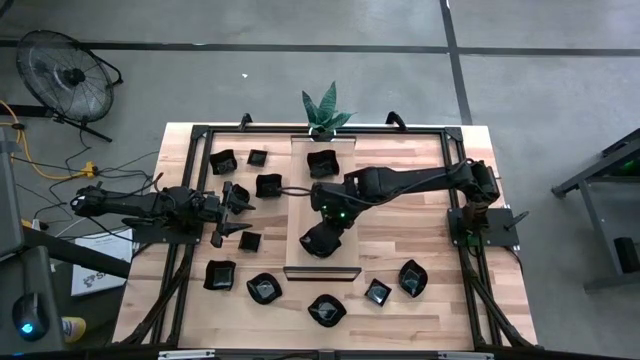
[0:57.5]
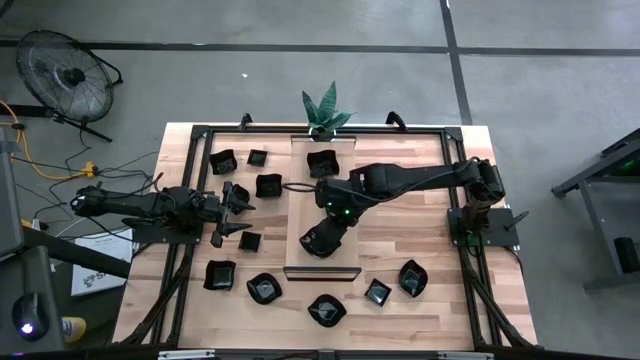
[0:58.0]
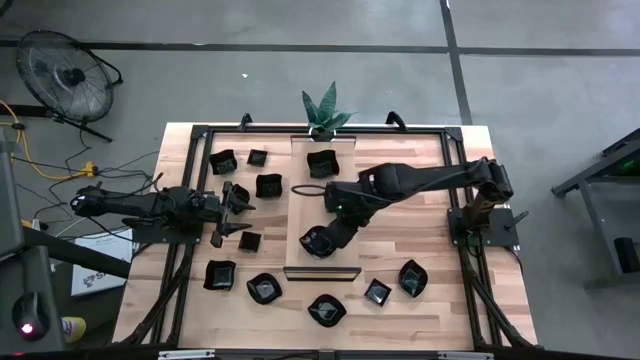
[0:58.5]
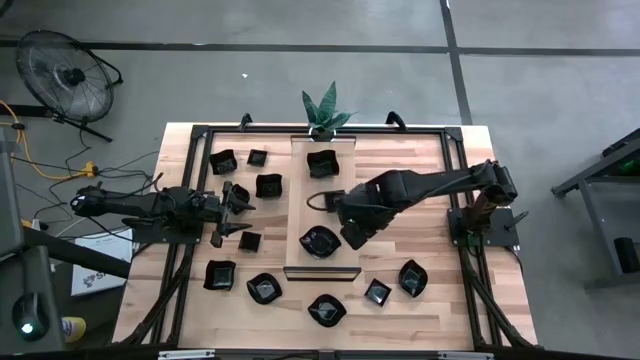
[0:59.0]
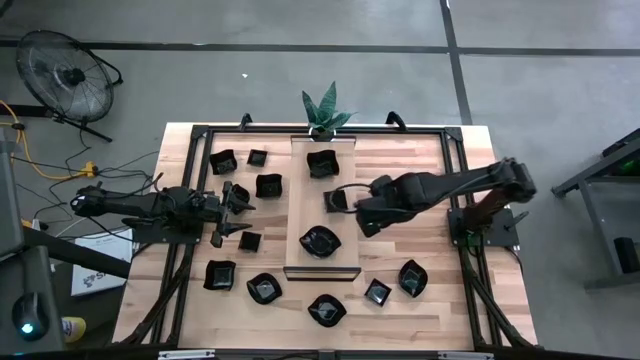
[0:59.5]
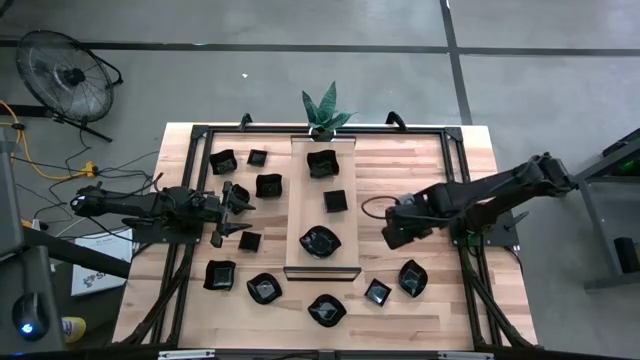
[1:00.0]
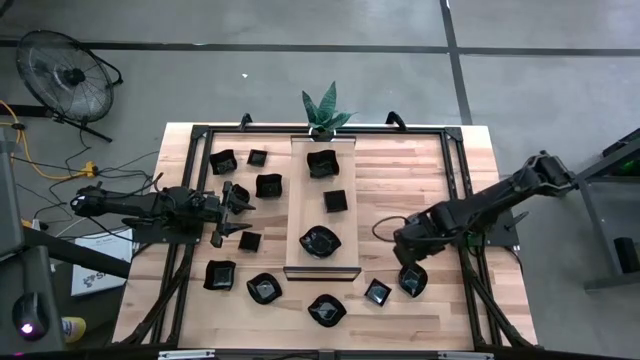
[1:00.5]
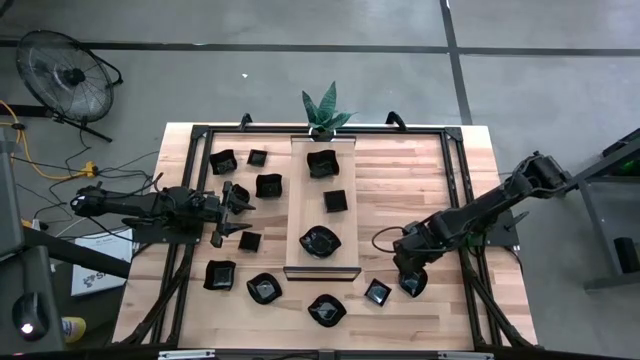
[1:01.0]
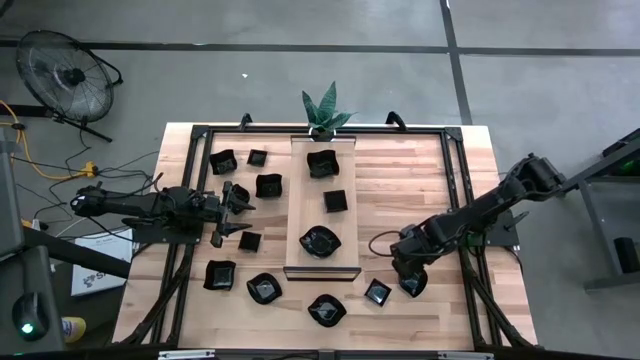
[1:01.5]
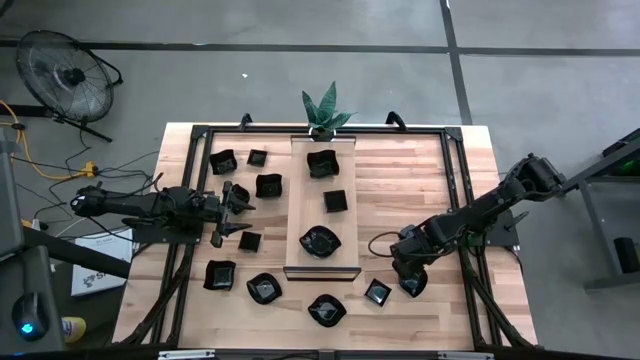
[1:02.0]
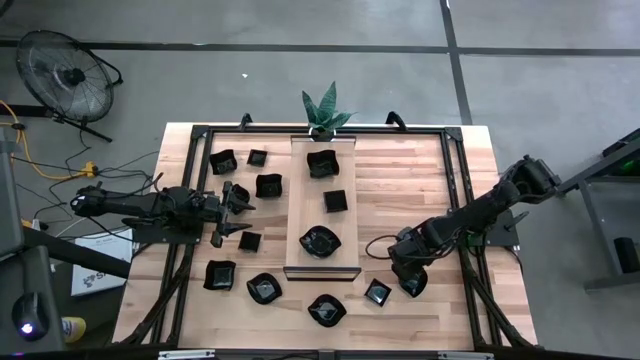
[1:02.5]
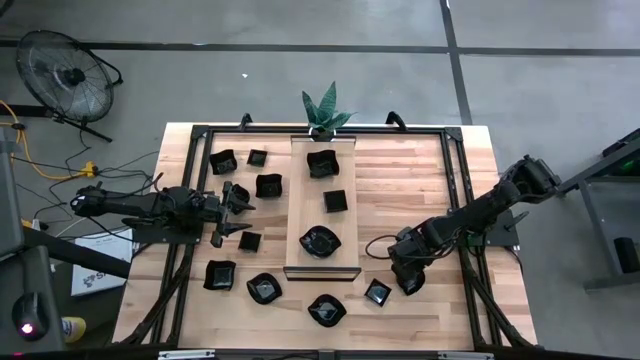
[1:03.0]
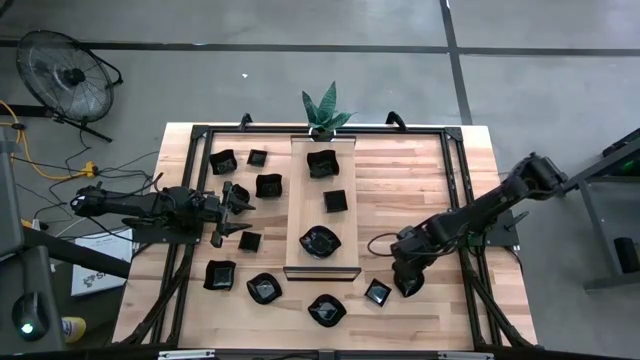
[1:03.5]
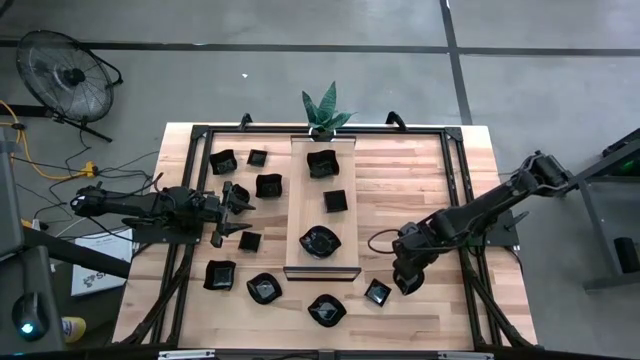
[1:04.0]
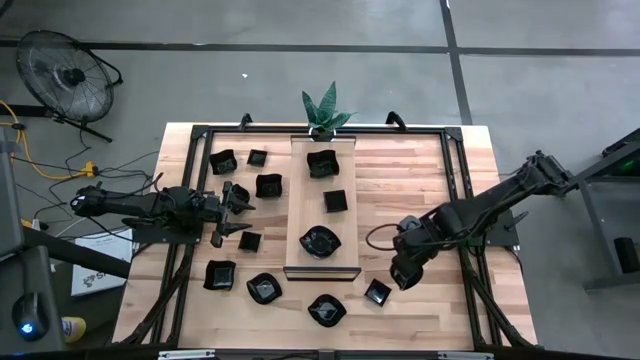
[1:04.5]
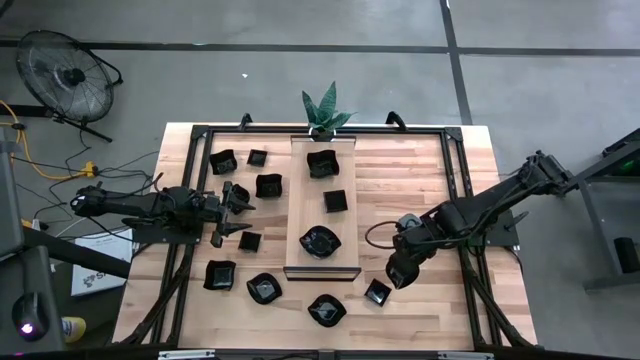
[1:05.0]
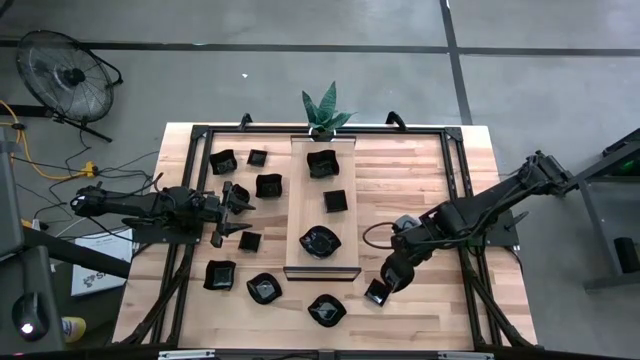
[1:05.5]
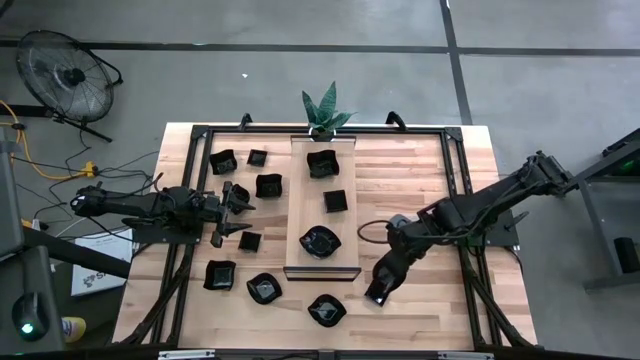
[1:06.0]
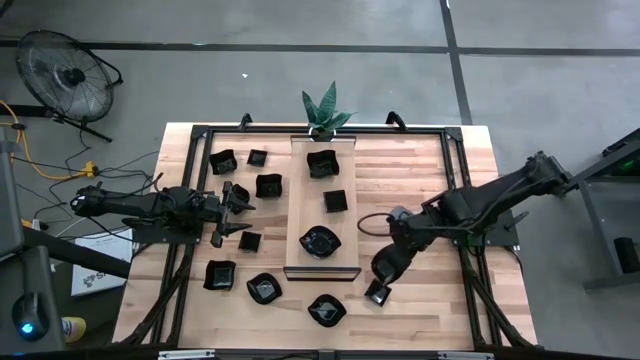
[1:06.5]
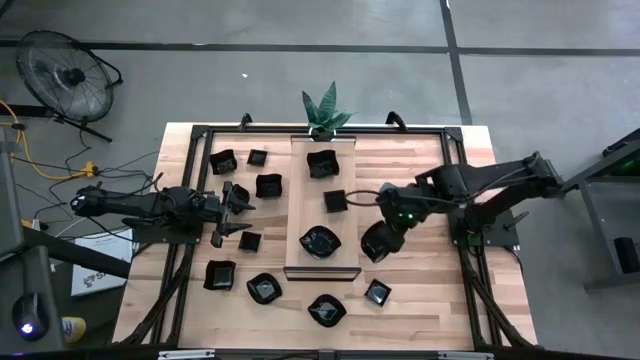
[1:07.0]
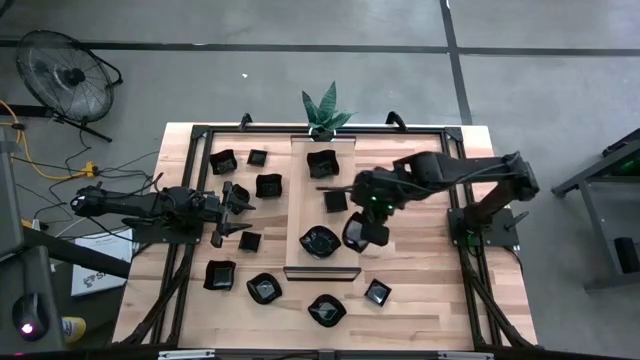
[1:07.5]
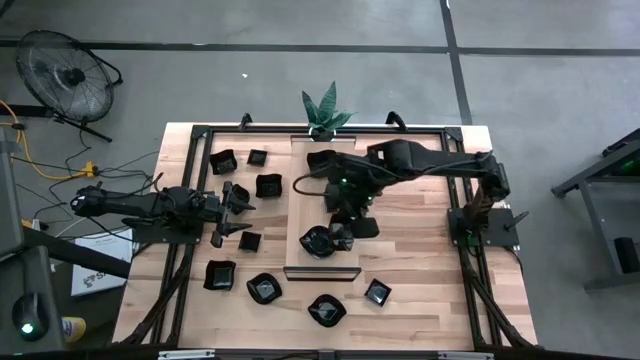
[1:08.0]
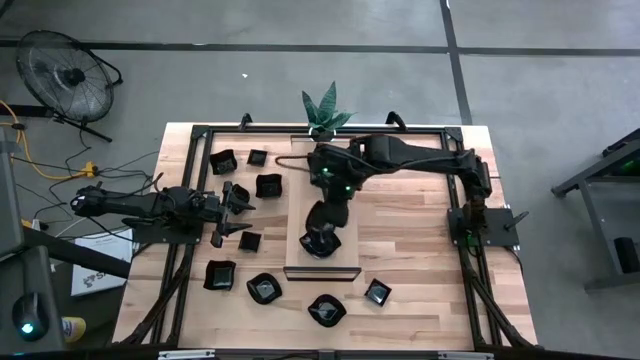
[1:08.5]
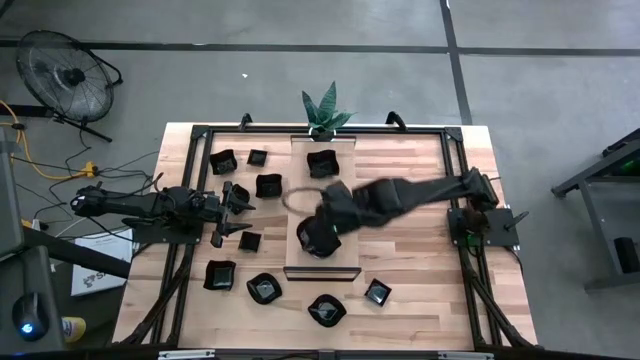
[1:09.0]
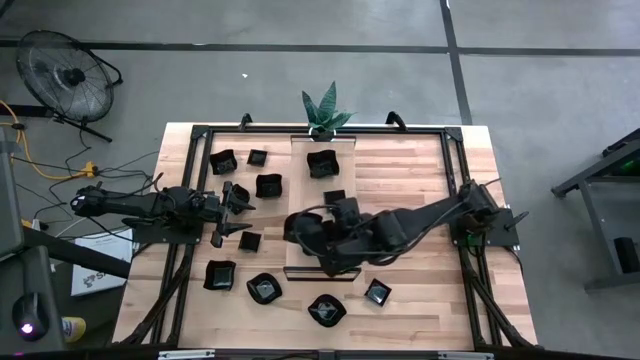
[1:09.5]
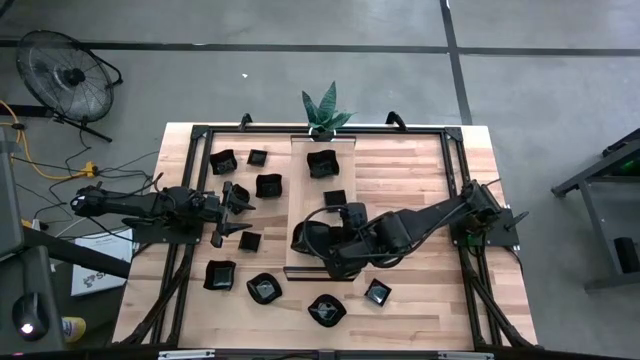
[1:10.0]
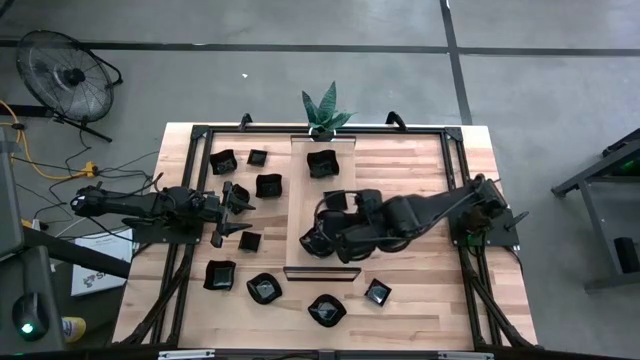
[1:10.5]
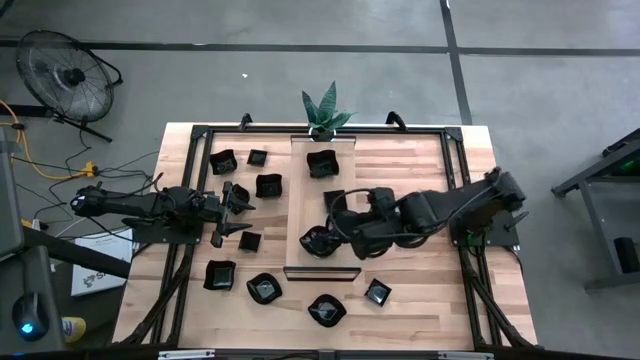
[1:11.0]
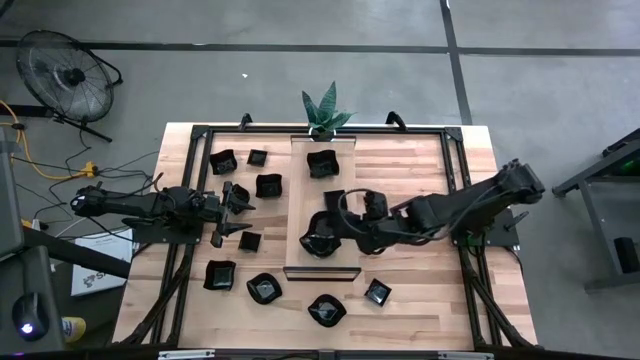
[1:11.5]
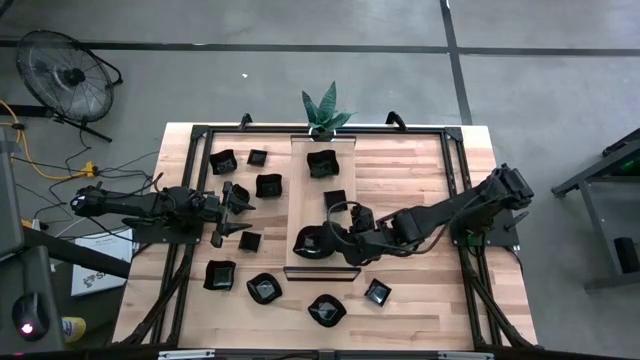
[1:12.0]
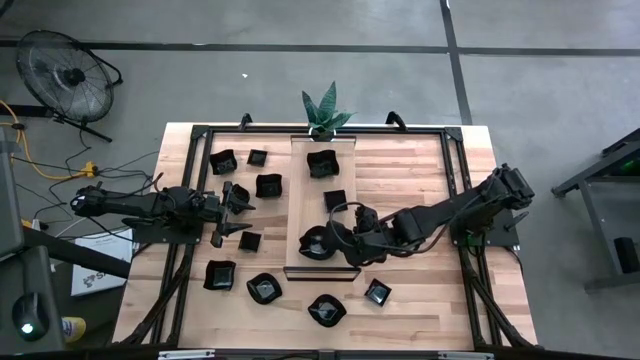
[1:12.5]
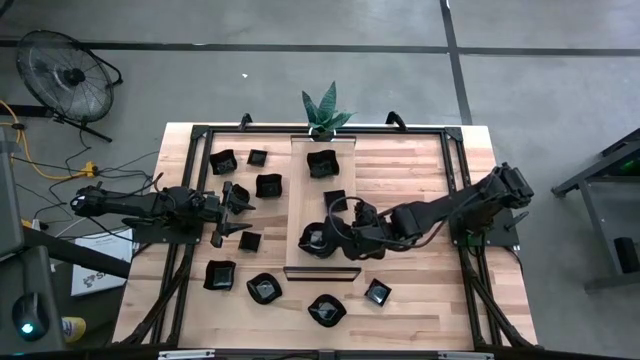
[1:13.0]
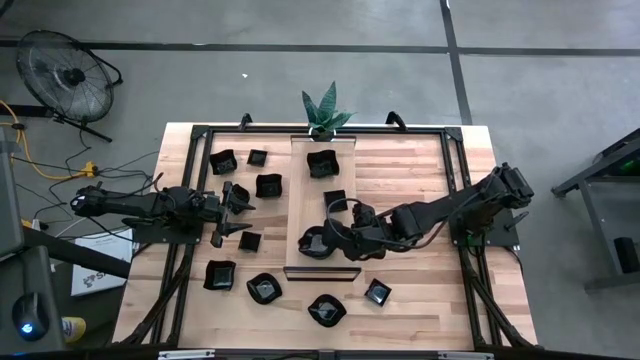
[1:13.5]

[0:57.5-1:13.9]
Task: Pick & Place Mini shaped plates
Stack the black leaf shaped plate on top of the black leaf shaped plate on the shelf
